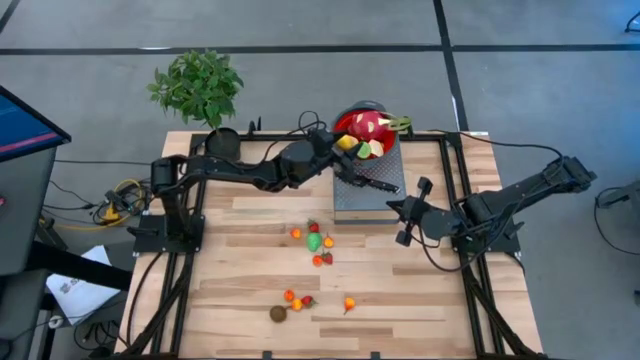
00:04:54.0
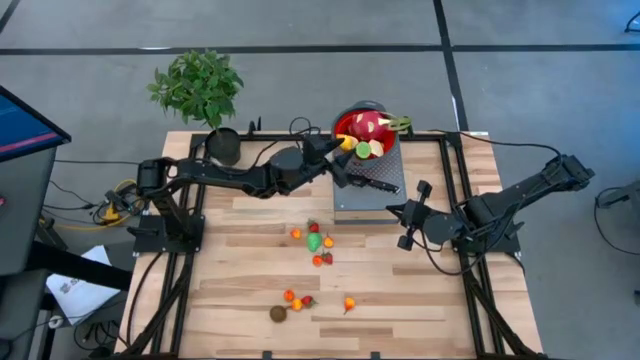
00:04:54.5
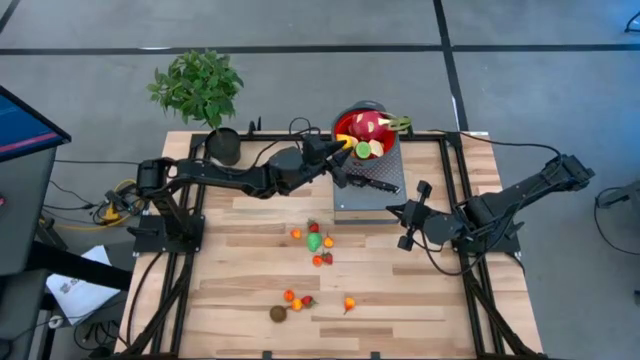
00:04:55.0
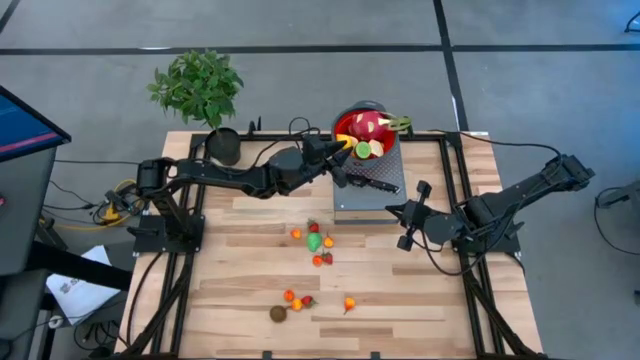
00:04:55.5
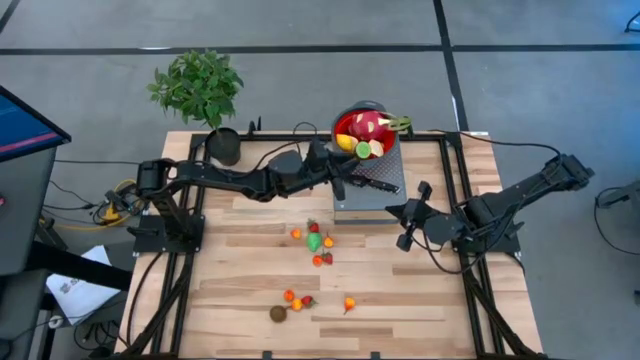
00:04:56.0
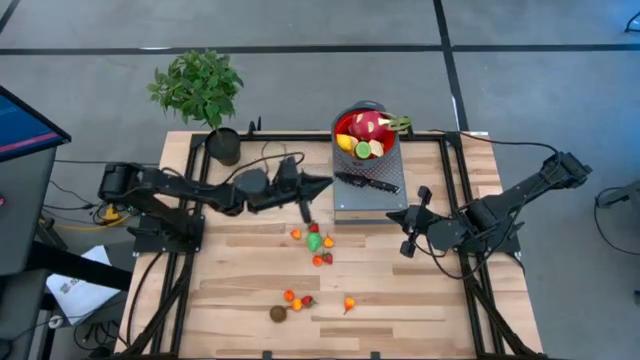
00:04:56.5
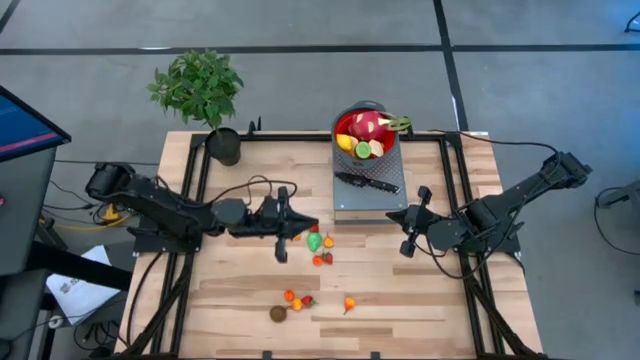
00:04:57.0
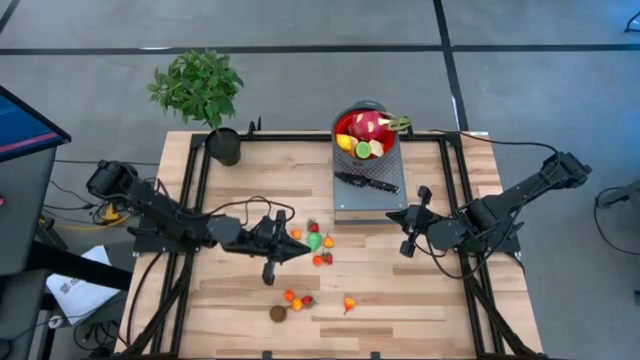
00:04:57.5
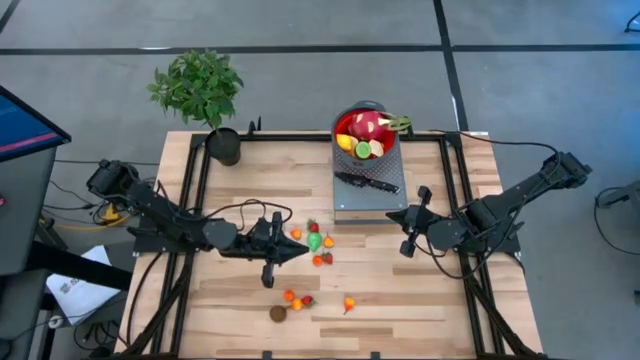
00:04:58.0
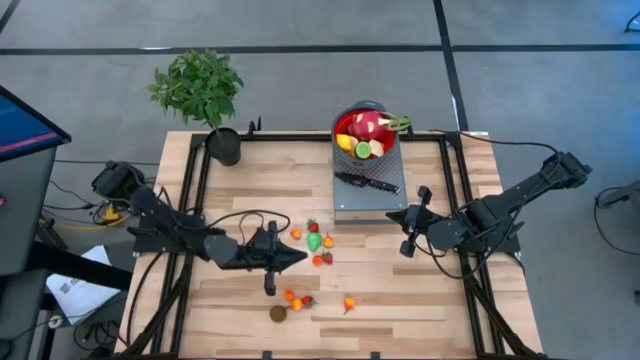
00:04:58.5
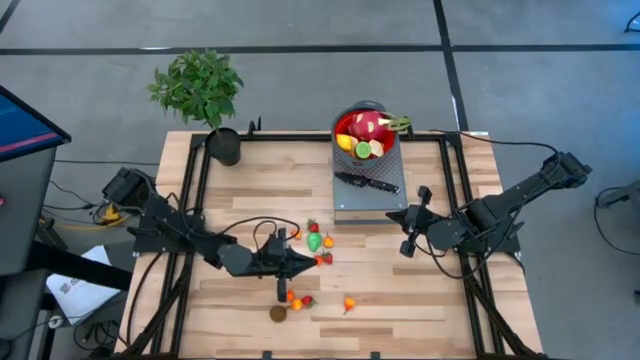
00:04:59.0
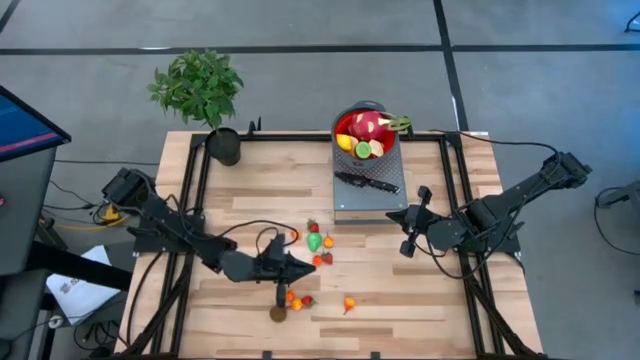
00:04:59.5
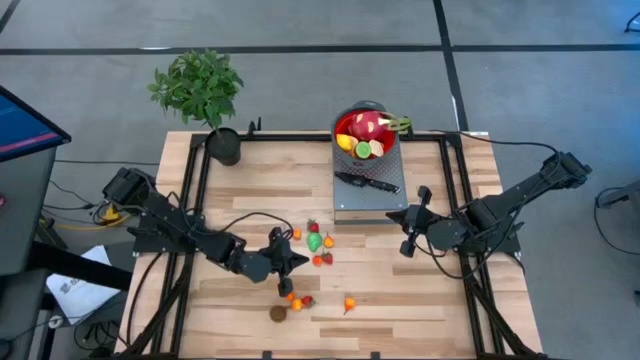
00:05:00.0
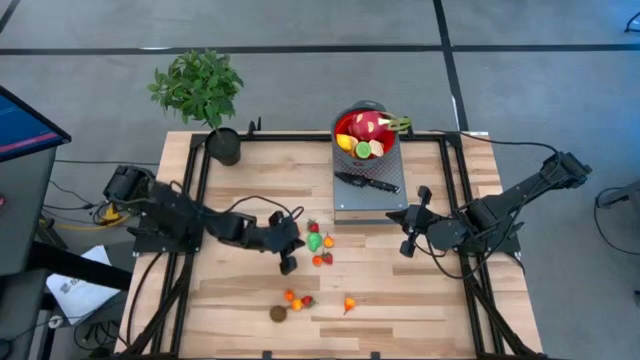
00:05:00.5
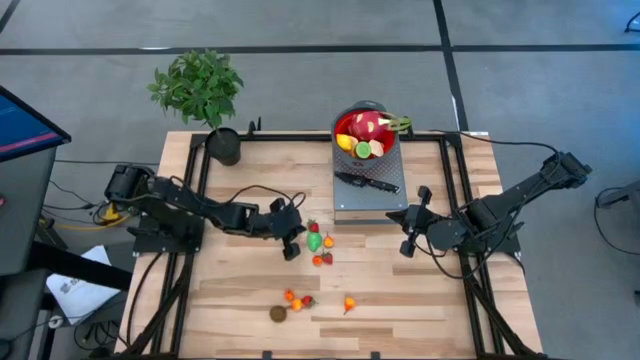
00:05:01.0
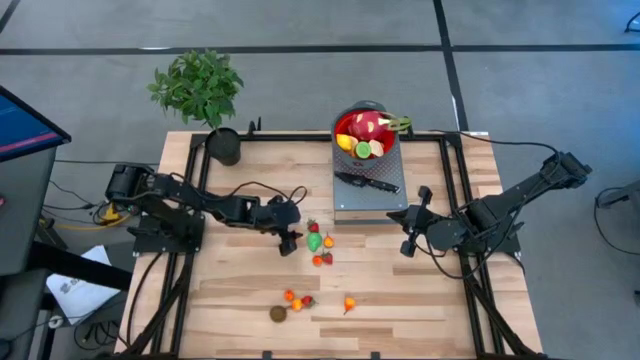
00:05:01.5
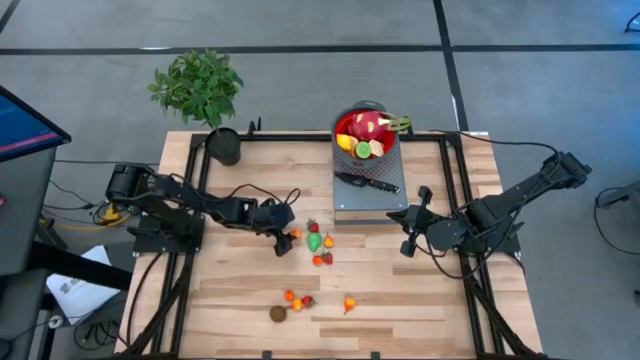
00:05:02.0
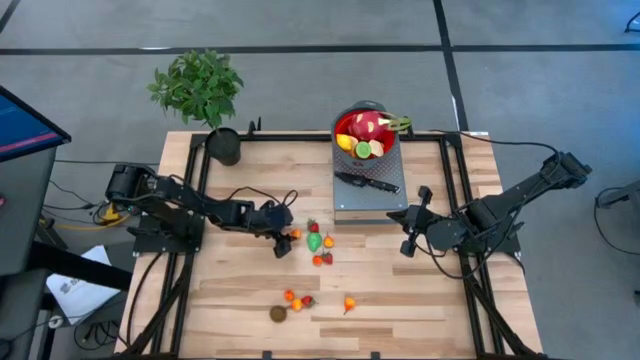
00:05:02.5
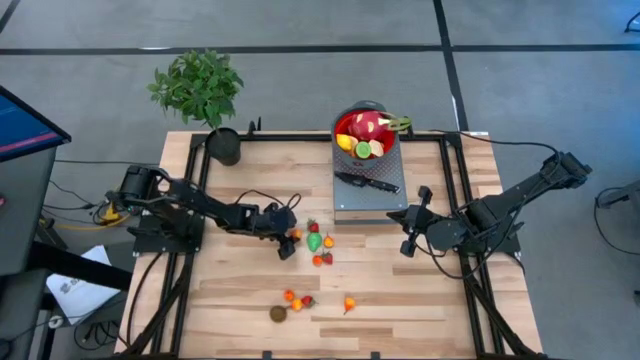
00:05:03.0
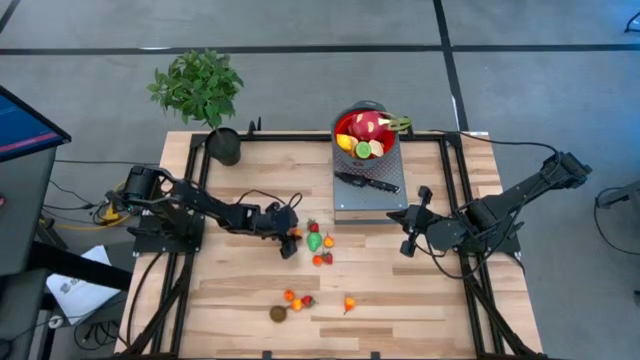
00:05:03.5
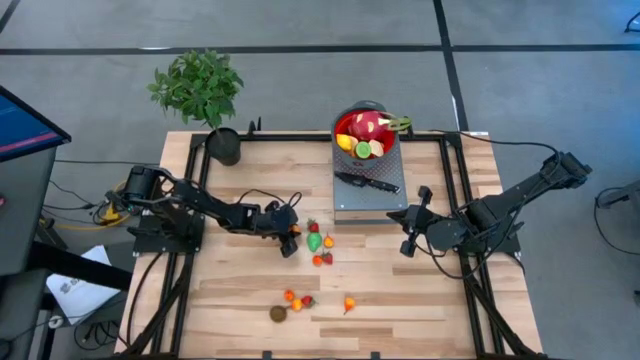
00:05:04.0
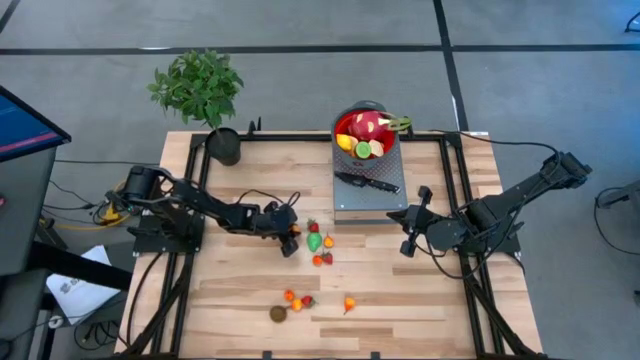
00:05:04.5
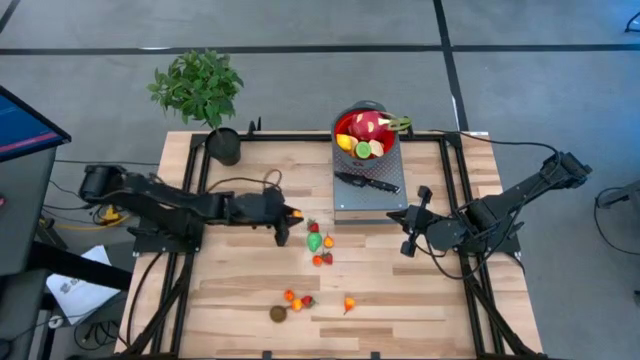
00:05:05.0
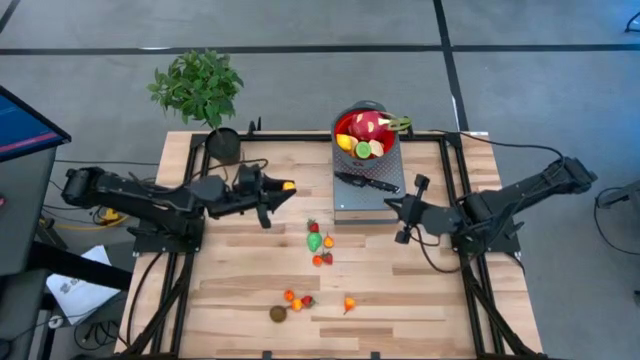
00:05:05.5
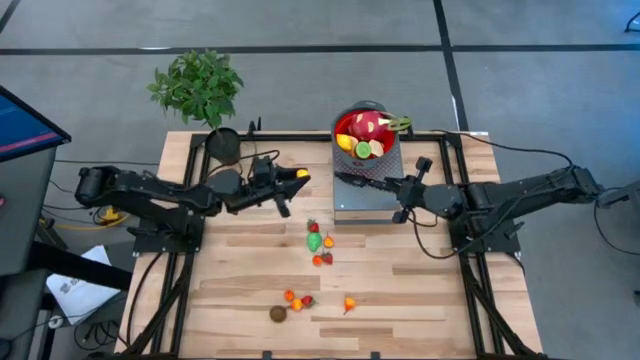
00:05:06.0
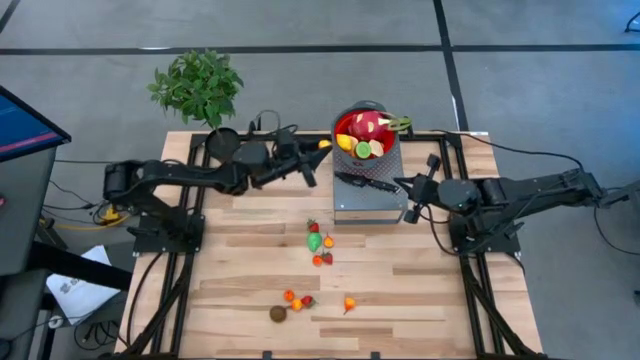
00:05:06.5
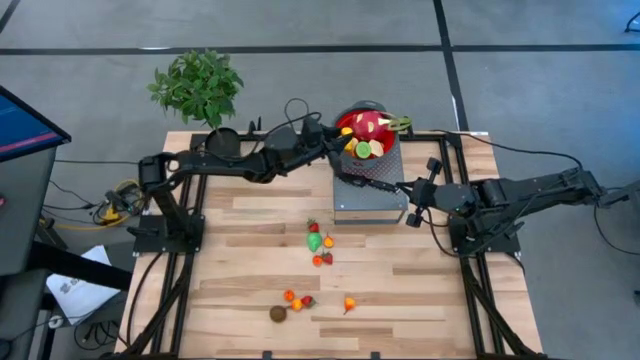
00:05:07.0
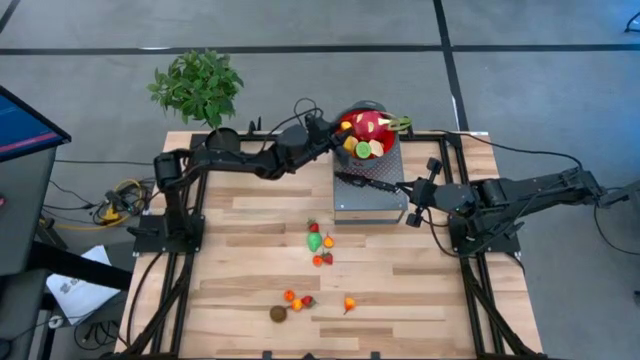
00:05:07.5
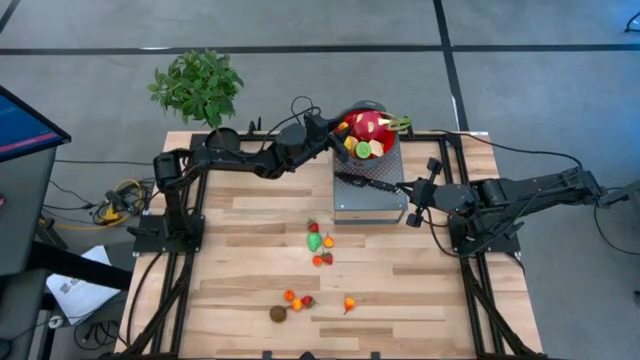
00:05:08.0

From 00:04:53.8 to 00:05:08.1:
Task: Pick & Place Fruit
Put the yellow pear into the red colander on the shelf

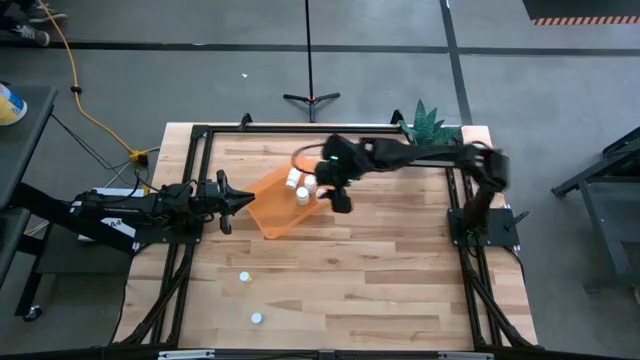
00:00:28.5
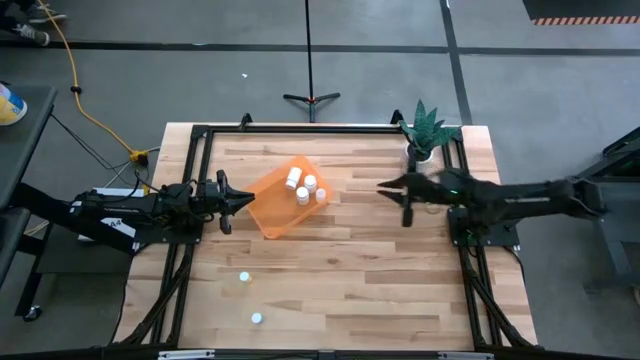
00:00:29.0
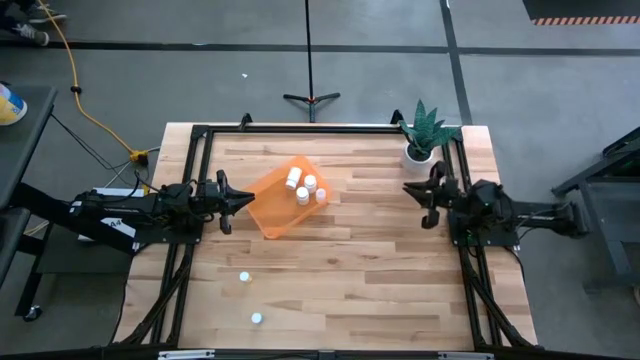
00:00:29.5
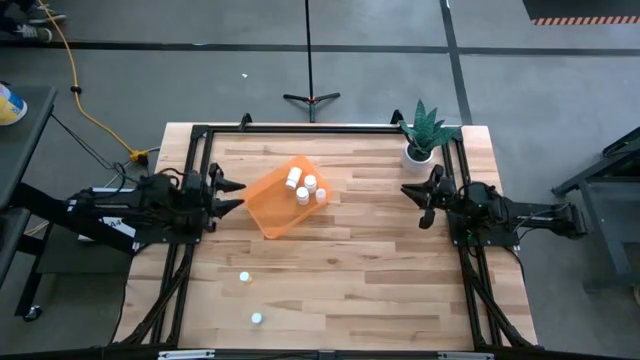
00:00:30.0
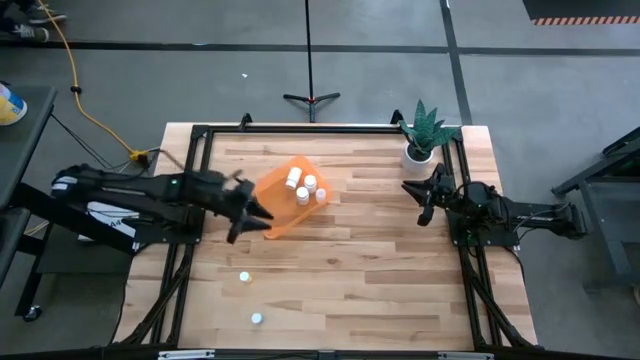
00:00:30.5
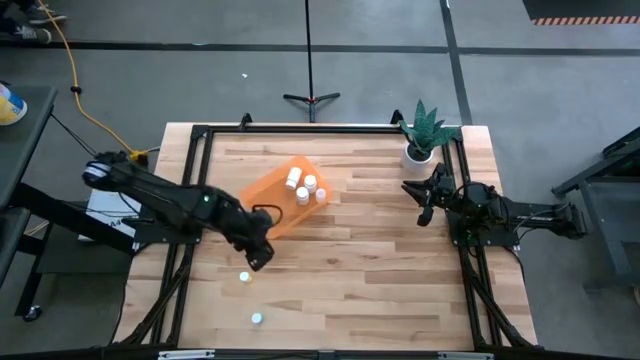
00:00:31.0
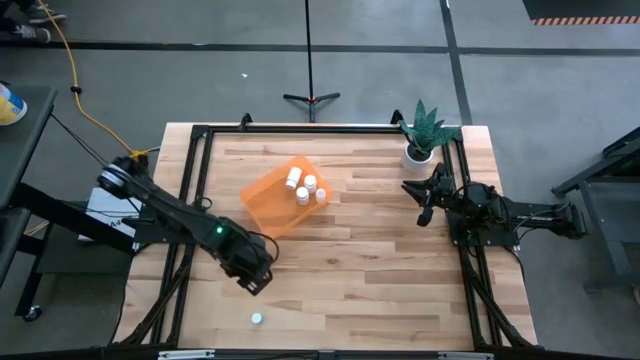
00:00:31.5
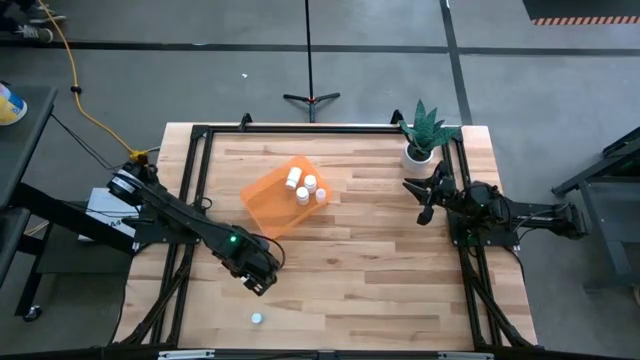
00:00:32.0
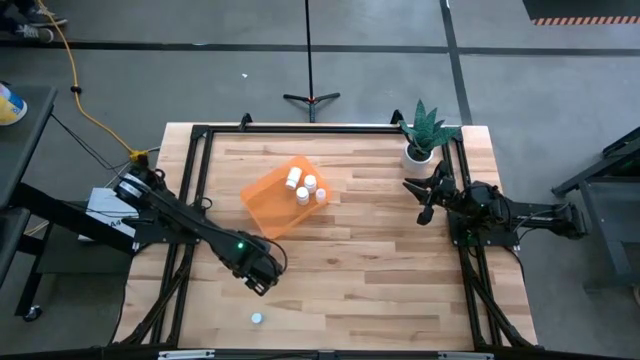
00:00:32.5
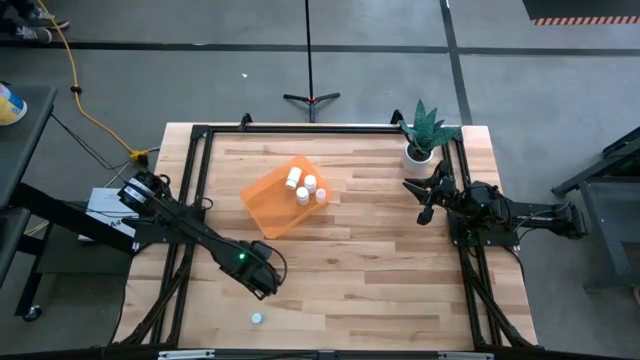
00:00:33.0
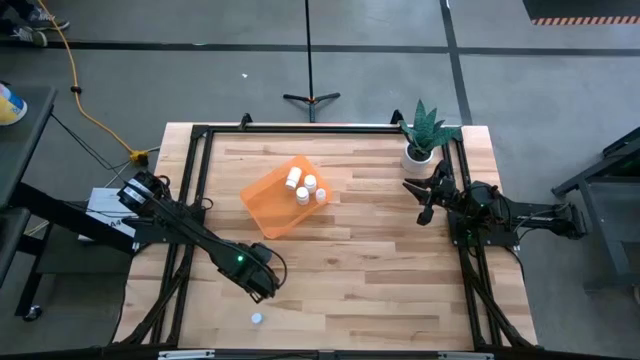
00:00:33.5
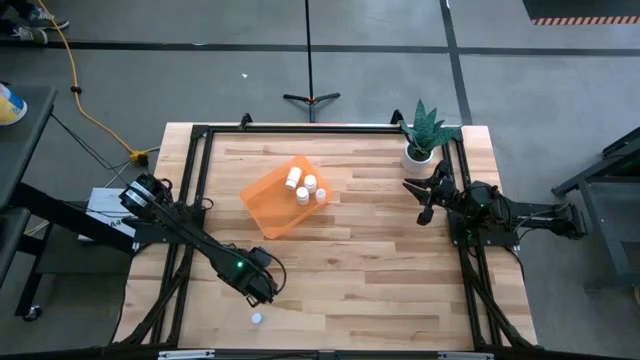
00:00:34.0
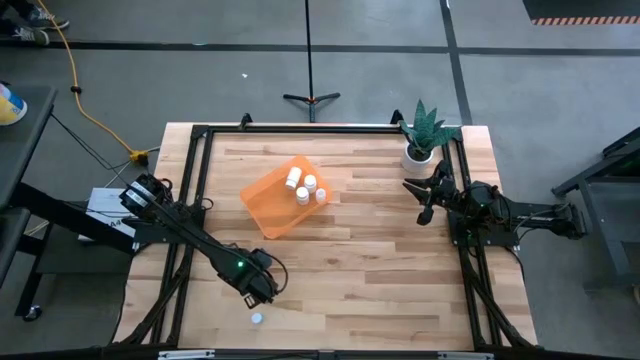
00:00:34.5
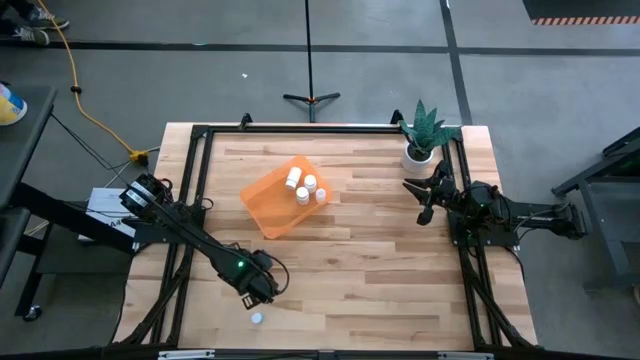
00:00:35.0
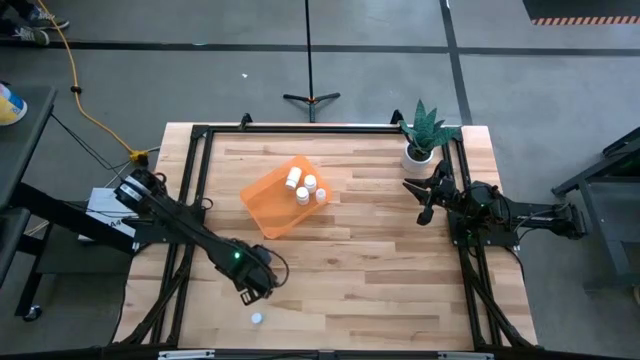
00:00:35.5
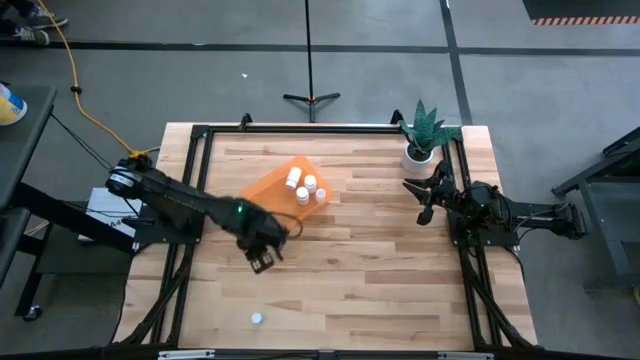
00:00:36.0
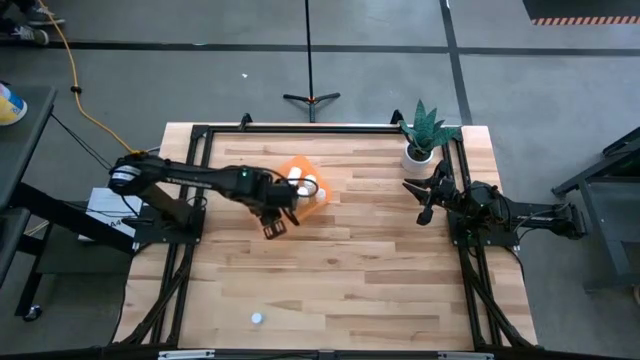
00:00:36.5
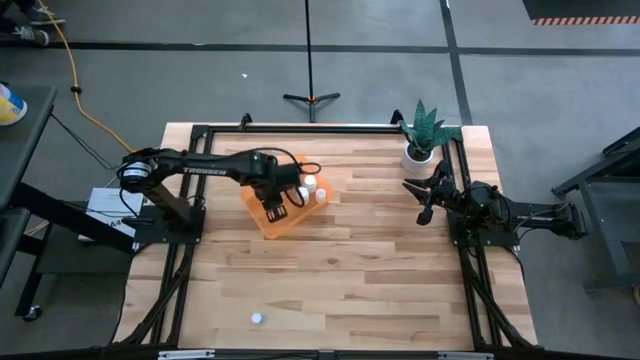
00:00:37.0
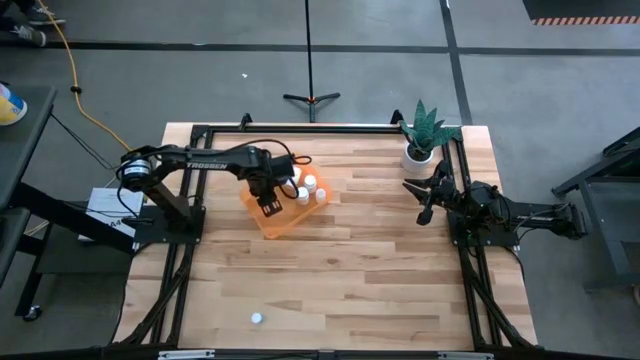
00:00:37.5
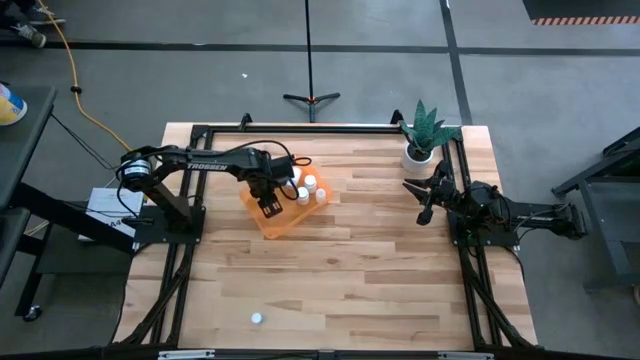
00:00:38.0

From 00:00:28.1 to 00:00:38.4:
Task: Pick and place pill bottles into a basket
Put the yellow pill bottle into the orange bin
